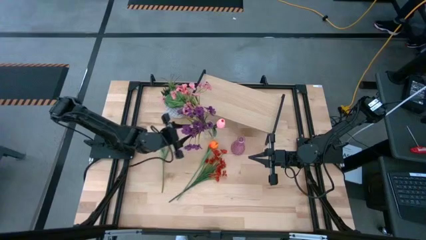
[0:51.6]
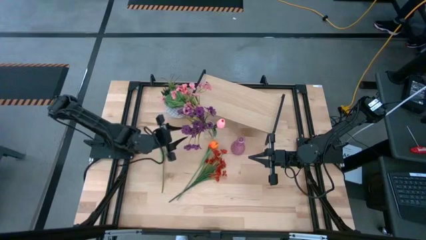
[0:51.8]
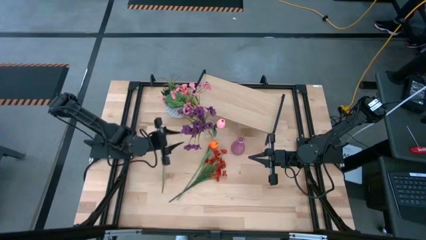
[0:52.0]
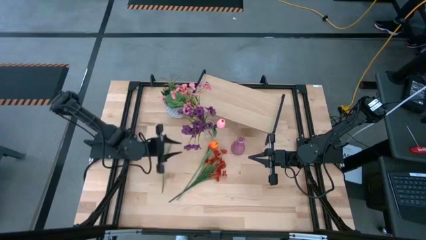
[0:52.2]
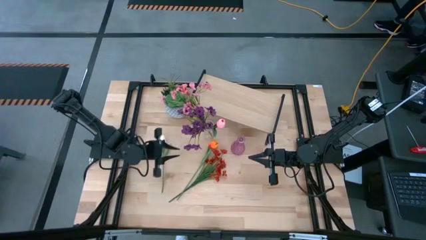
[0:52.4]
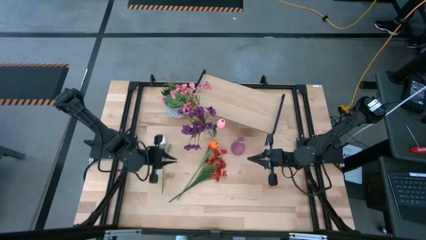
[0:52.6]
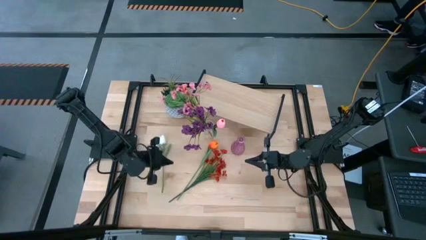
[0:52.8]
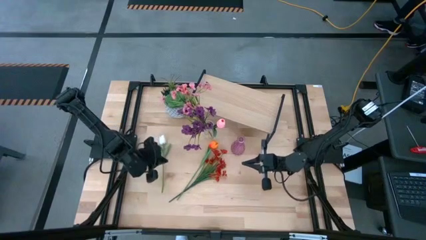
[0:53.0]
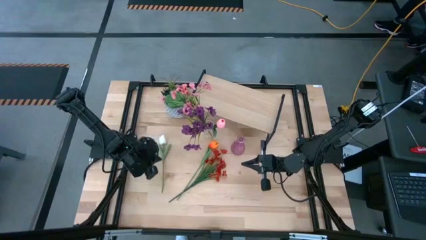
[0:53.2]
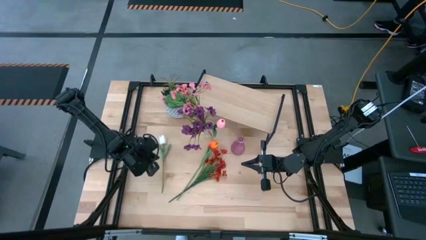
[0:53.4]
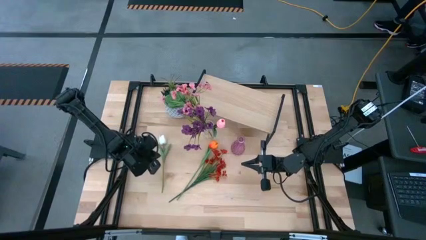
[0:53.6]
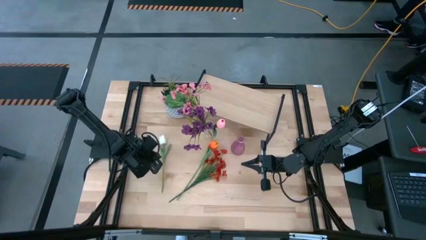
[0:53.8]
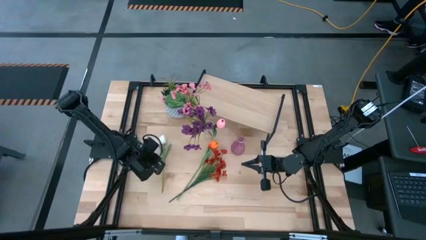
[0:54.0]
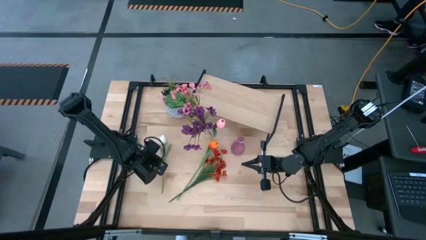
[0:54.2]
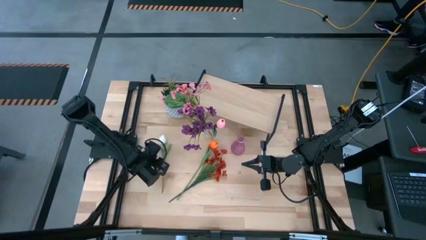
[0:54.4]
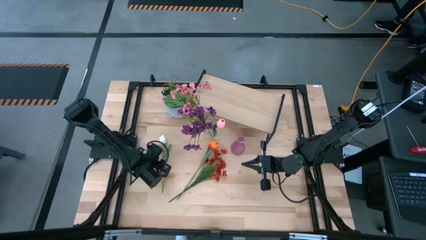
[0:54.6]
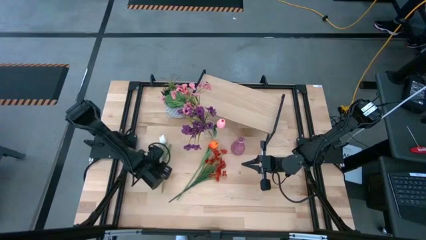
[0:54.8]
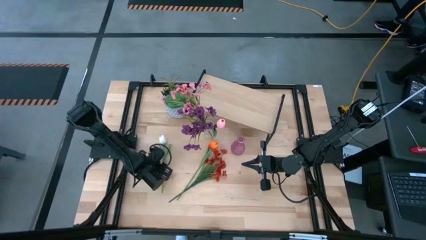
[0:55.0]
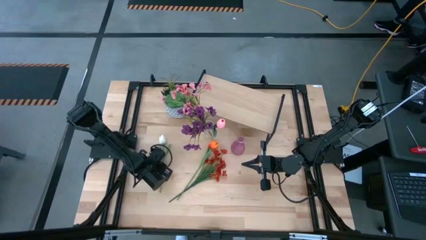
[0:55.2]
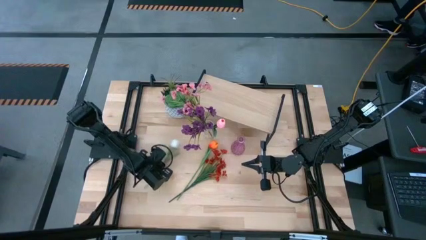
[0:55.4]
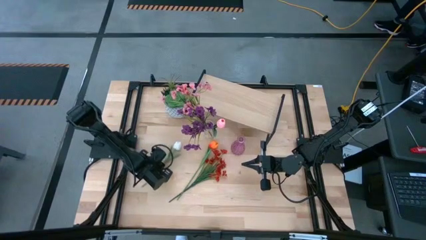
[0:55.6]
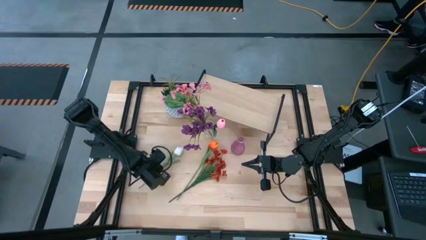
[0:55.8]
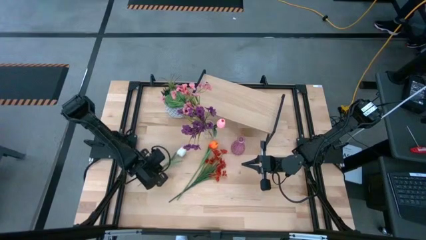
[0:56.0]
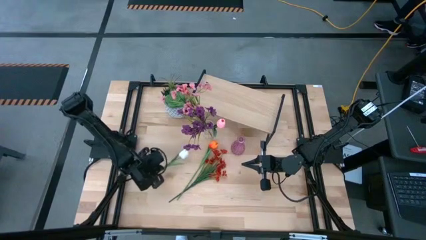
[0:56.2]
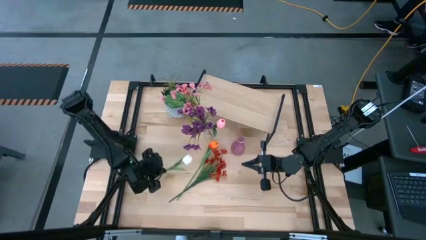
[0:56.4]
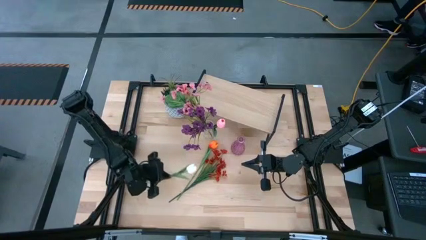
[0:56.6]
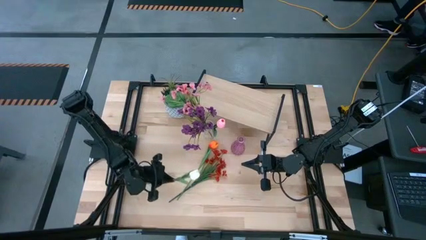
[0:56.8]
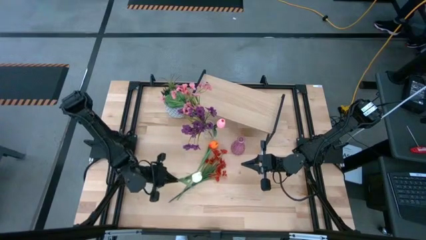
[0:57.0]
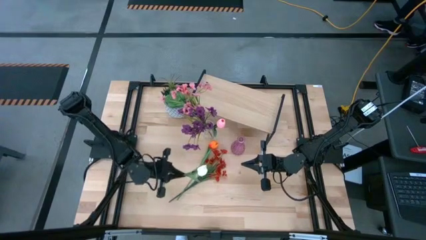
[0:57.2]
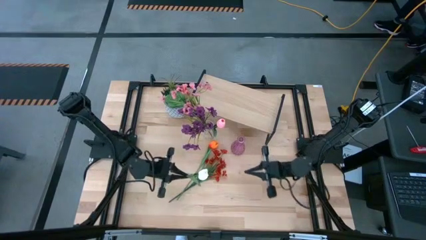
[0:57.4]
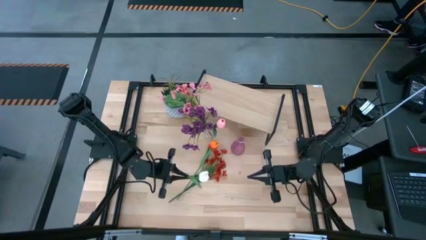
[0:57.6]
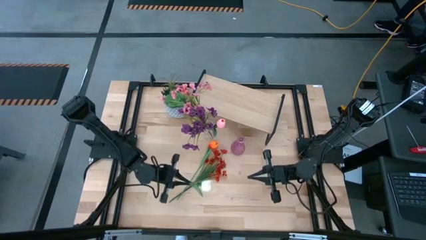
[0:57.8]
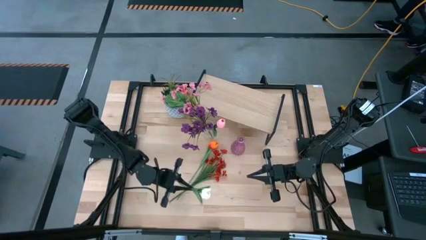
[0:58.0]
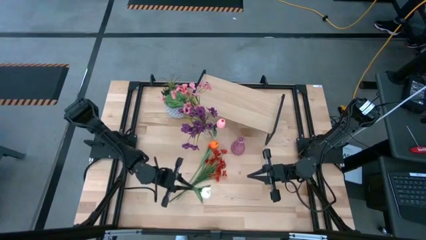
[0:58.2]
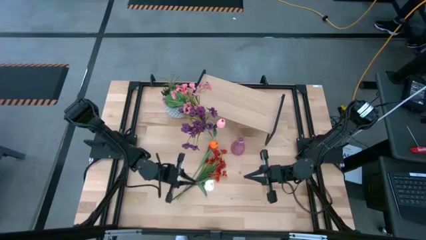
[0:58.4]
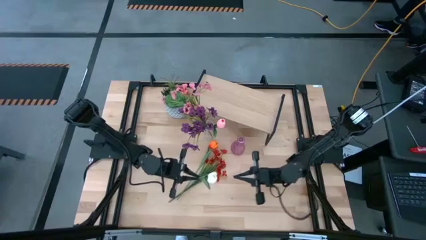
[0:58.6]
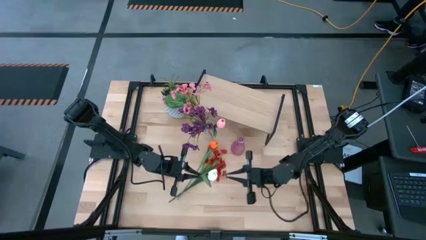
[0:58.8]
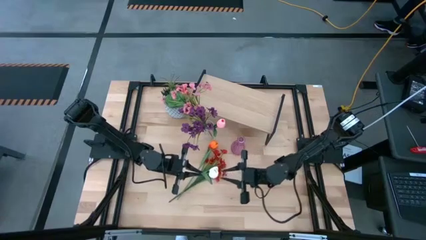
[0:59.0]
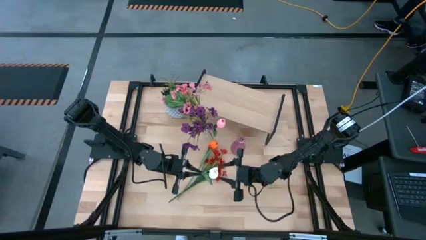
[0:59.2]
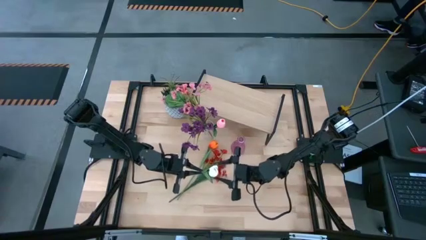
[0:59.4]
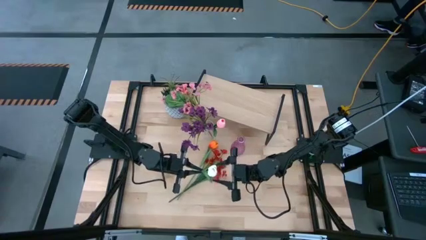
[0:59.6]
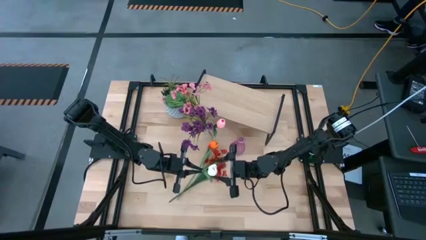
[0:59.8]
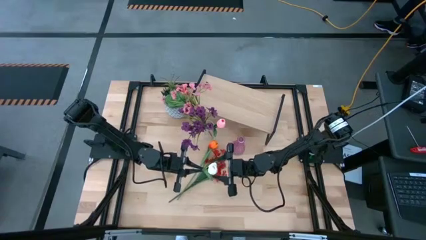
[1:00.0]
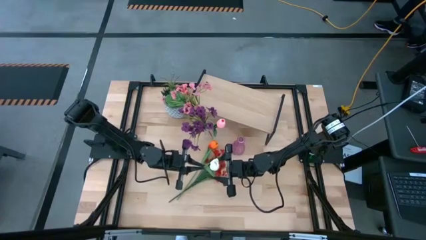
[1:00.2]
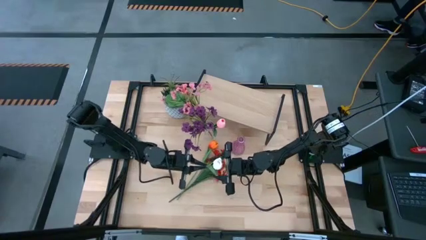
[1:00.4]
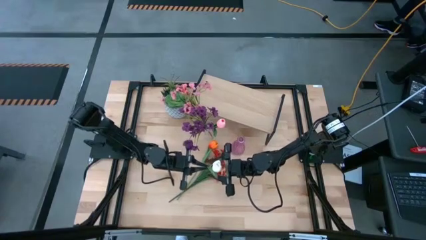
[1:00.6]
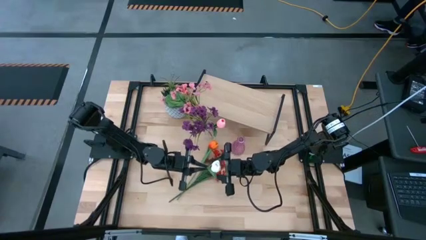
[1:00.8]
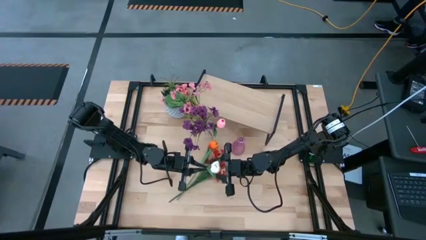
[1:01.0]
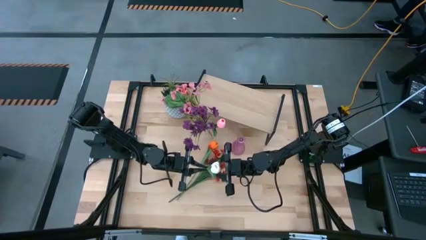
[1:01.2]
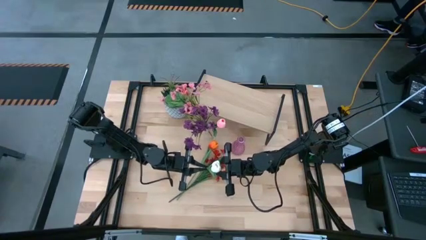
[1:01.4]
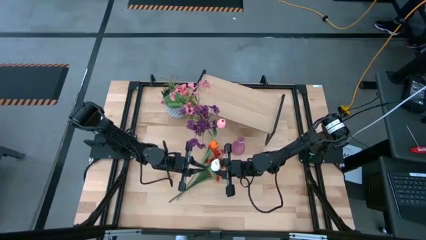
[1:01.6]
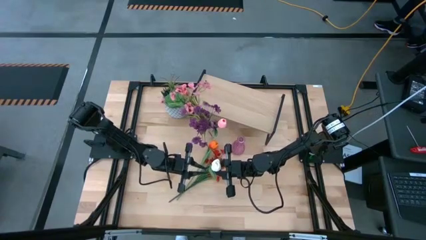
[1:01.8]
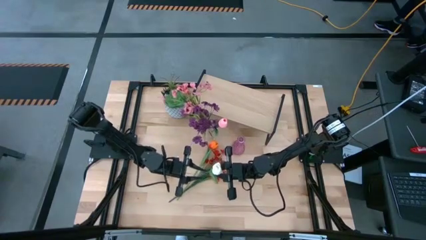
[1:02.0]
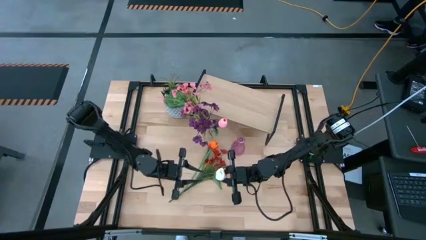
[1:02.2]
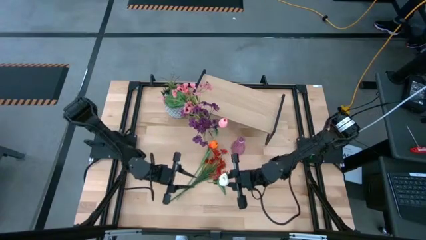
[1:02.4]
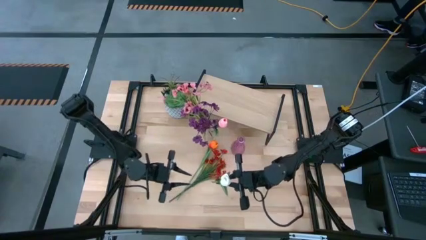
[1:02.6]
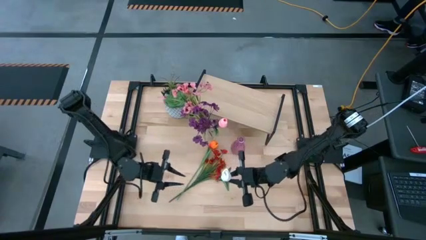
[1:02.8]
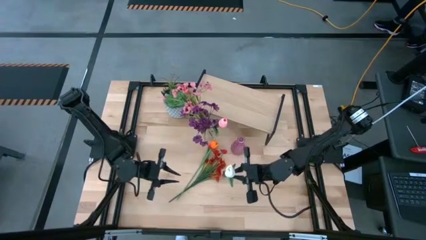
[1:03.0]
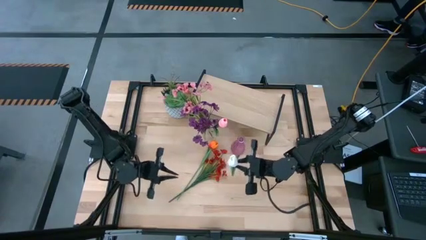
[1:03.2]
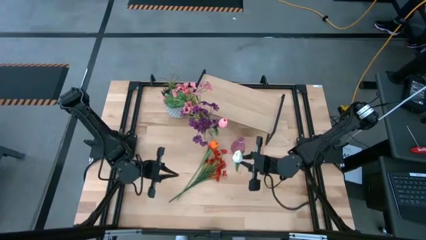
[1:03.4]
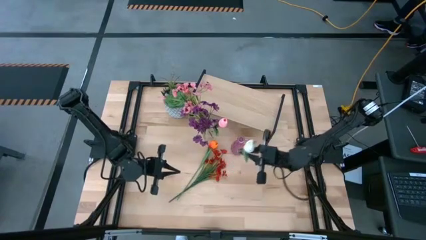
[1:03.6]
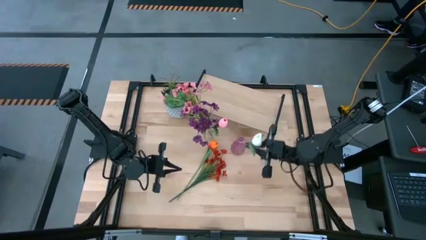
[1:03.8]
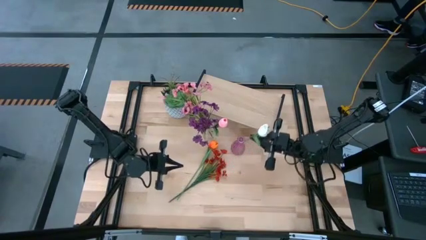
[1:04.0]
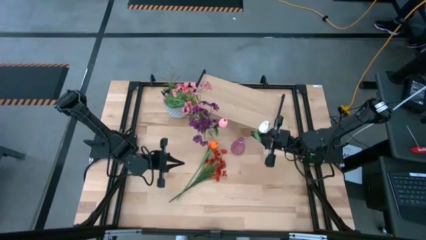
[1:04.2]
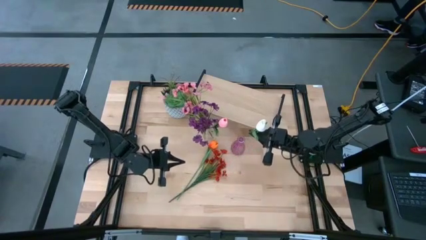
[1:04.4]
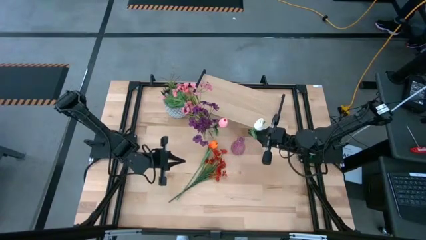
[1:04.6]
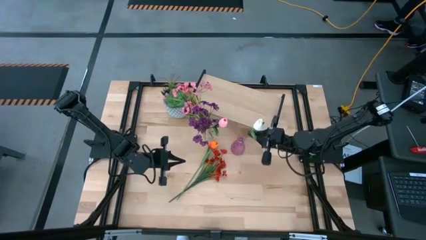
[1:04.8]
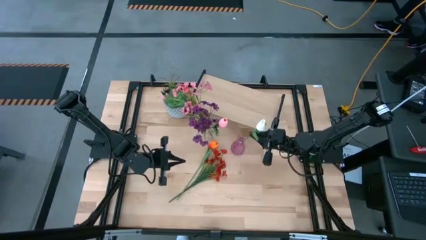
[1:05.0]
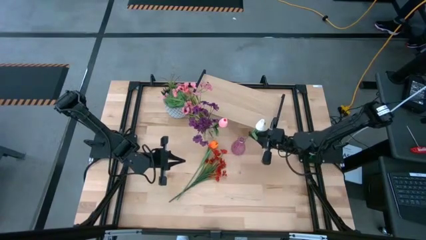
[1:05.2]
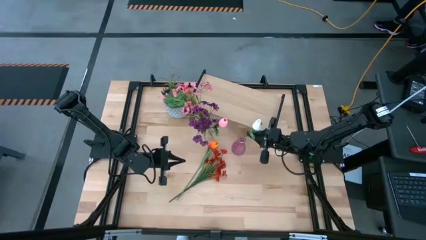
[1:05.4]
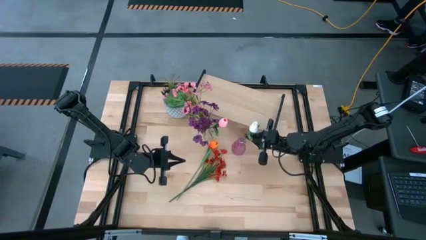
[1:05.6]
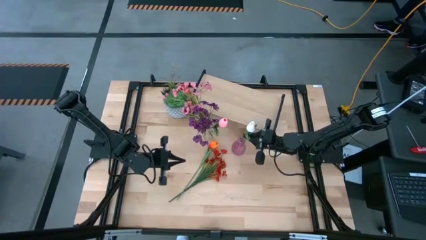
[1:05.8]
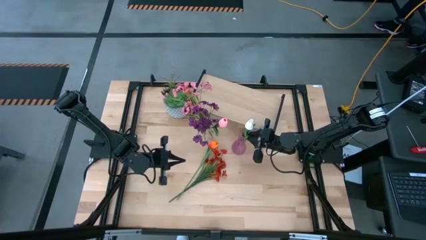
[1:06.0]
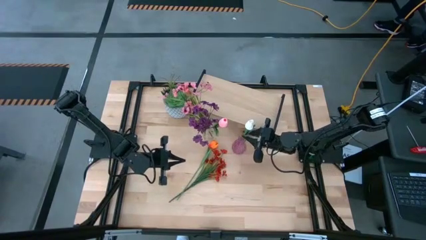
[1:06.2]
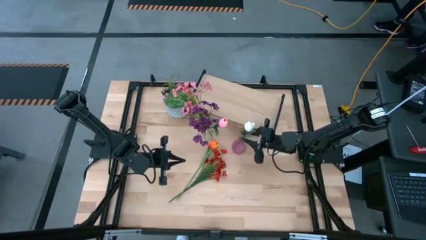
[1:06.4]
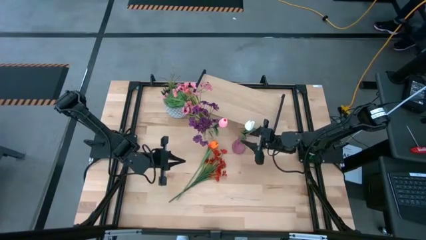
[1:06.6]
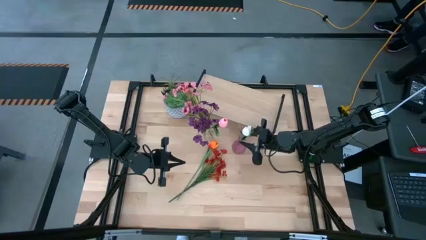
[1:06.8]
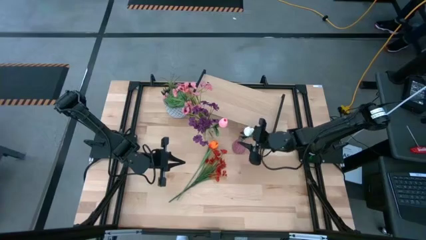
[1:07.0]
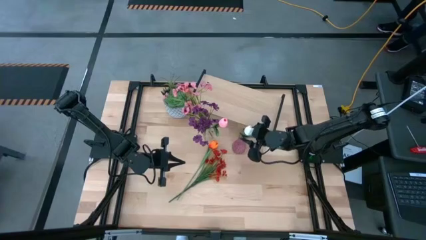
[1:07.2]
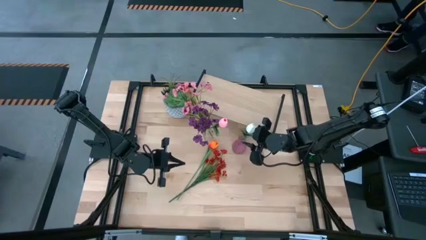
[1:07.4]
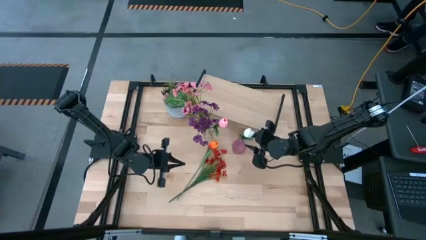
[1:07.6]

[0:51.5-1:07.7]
Task: Pick and place flowers into a vace then onto a shelf
Put the white tulip into the purple vase
